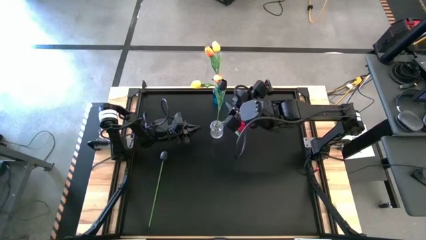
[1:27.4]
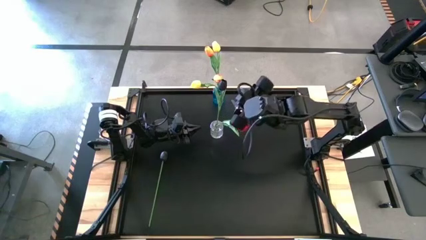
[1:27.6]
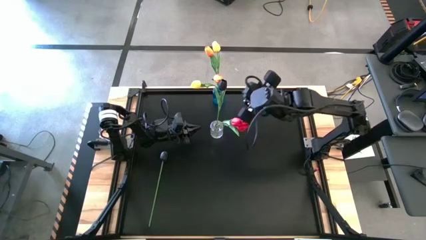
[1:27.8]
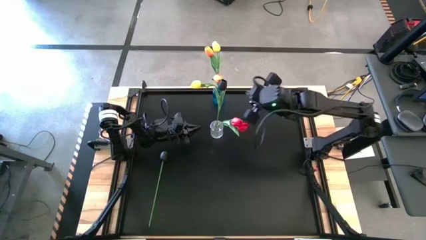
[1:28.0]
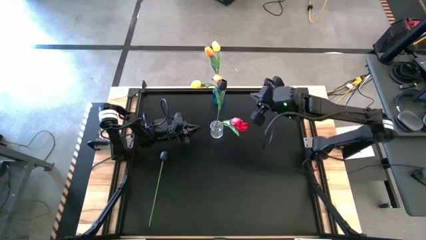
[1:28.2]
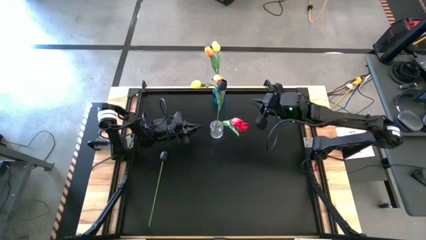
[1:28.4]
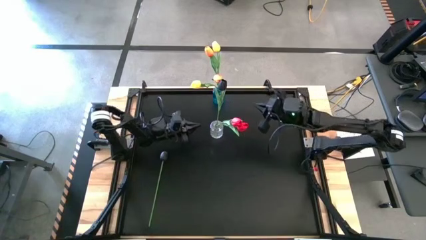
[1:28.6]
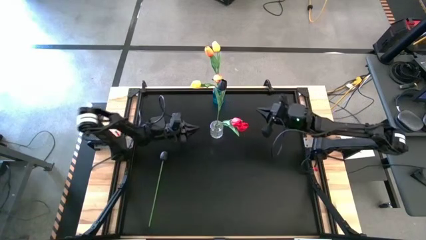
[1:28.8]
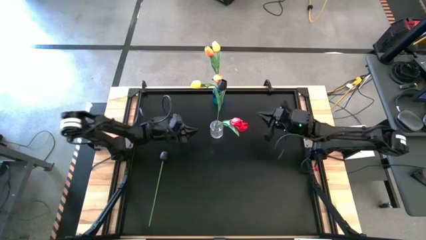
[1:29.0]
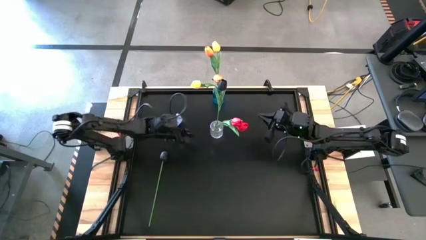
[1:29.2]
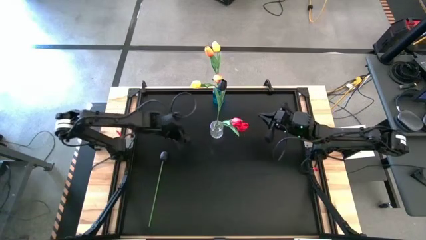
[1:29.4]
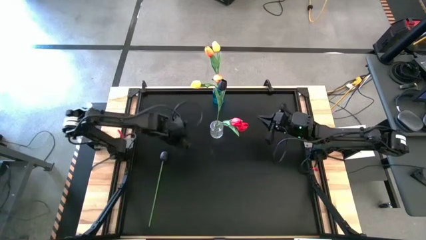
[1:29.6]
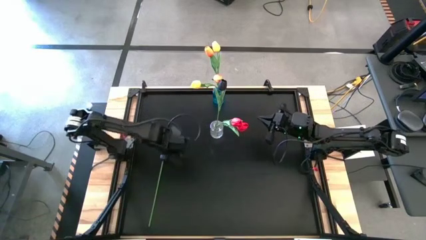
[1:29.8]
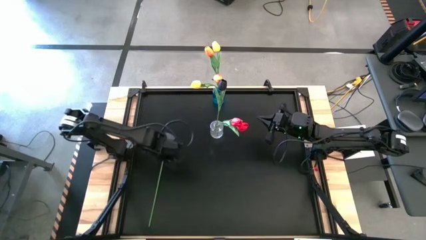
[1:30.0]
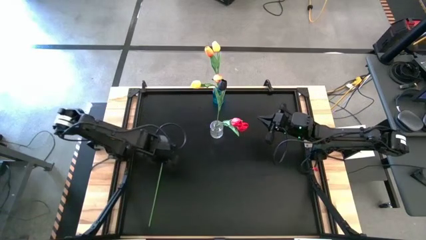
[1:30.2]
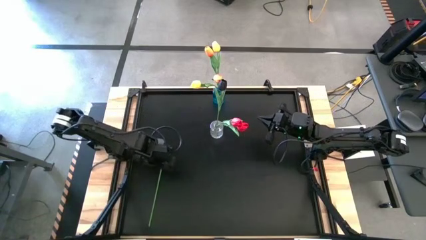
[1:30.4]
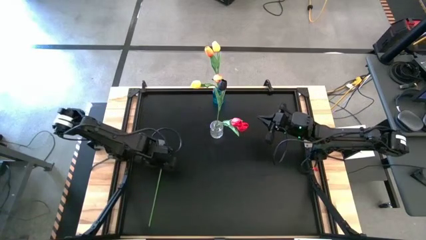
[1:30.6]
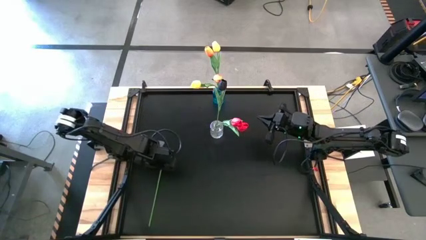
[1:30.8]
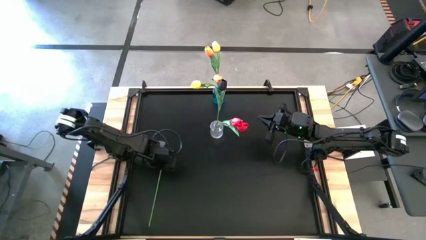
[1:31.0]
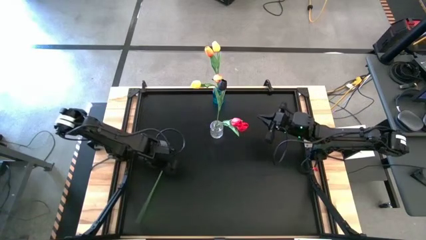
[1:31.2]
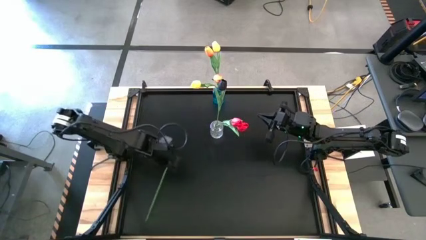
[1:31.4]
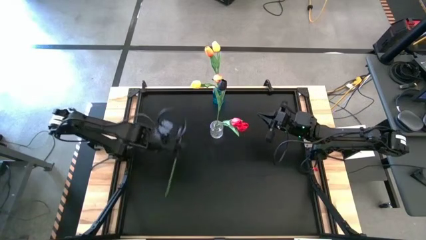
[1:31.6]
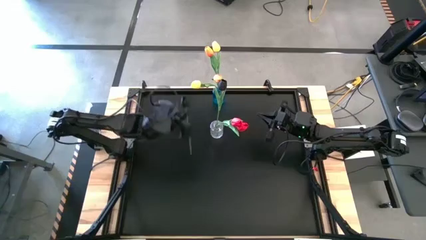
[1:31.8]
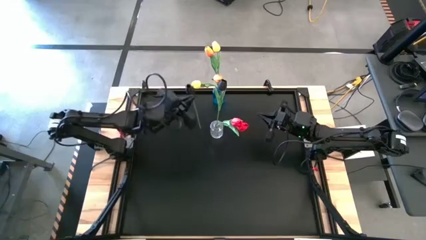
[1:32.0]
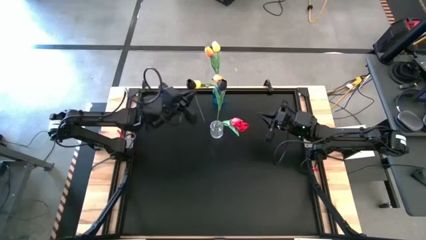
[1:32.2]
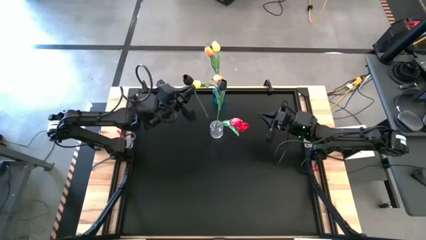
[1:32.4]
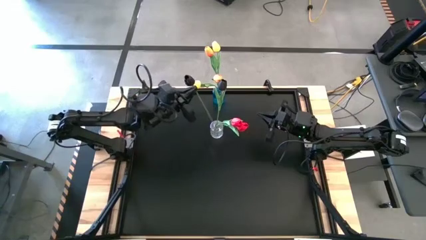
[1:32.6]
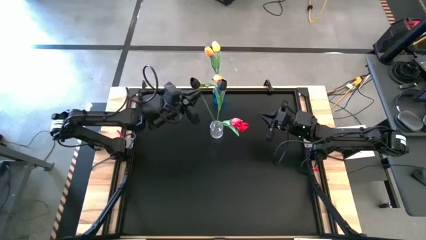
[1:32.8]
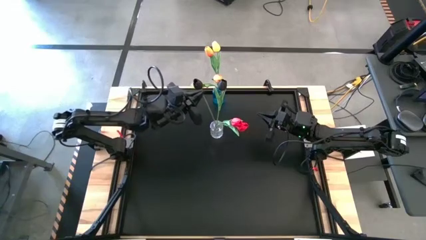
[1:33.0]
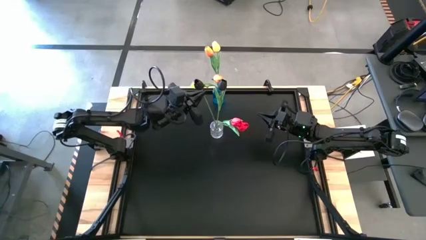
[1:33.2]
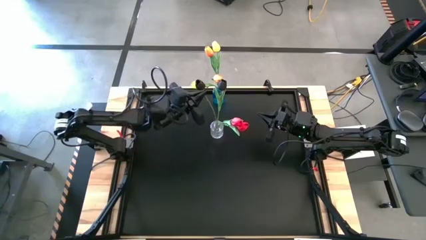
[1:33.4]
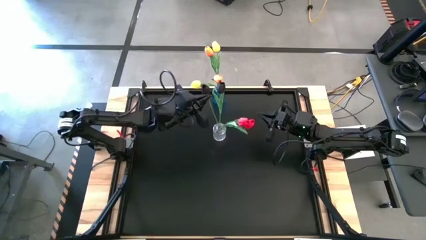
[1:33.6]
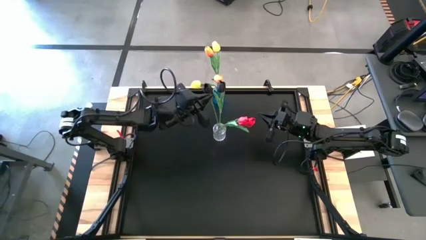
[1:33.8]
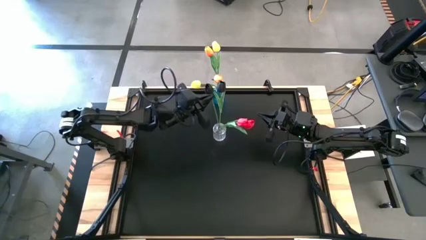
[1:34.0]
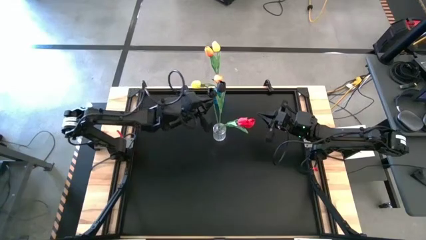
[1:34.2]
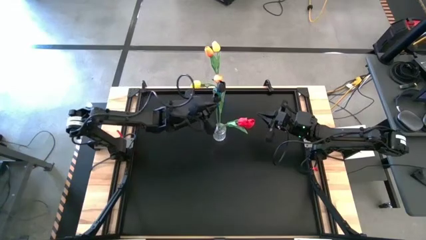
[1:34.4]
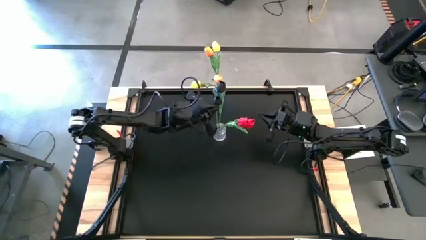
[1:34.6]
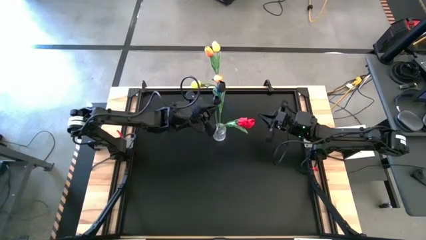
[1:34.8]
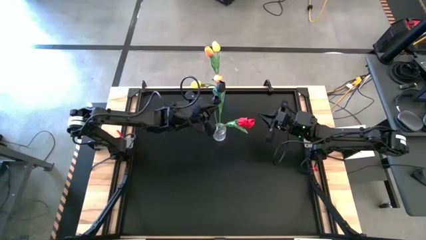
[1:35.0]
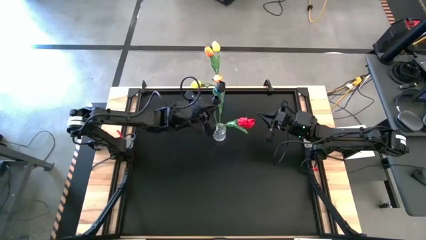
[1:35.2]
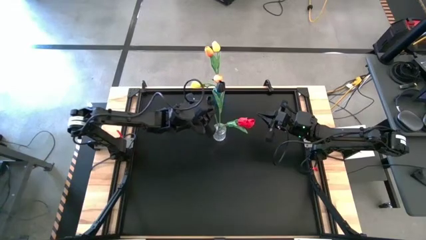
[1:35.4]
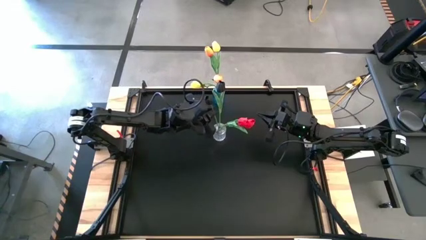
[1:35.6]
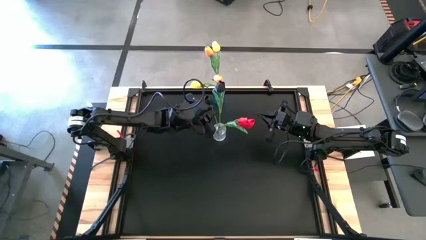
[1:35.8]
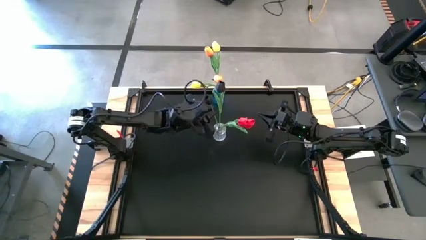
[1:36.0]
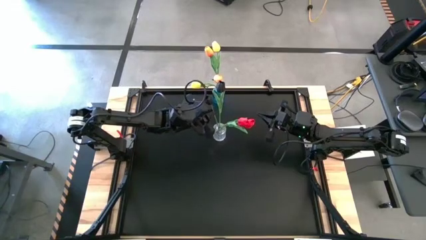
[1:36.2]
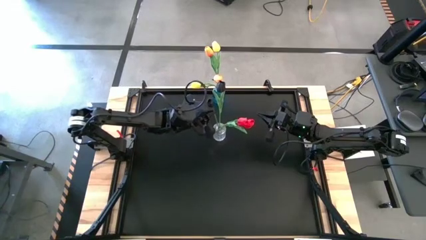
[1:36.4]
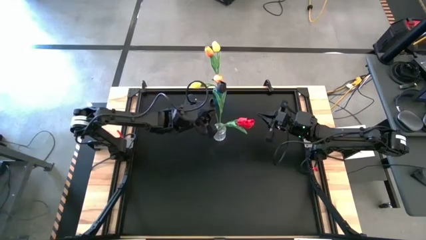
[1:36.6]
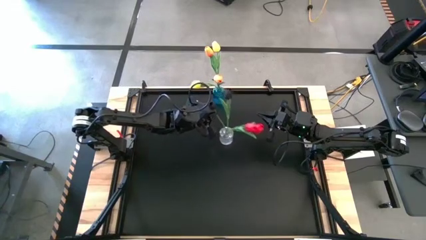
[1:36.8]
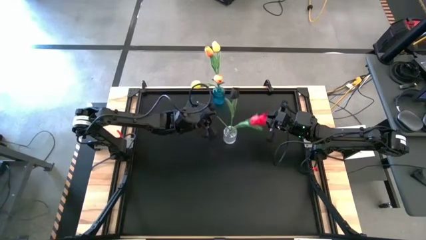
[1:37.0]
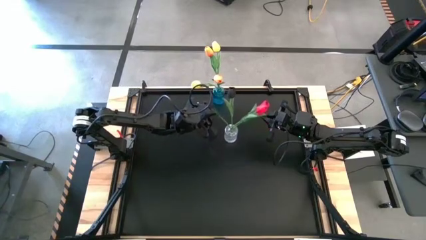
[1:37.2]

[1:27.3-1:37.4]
Task: Sort flowers into vase by color
Put the black tulip into the transparent vase

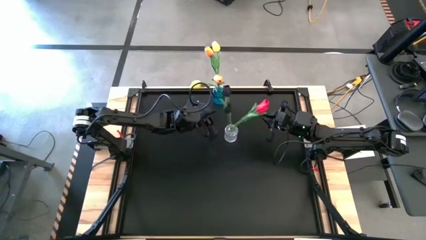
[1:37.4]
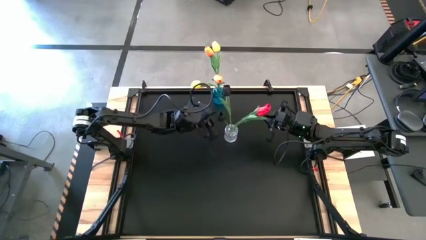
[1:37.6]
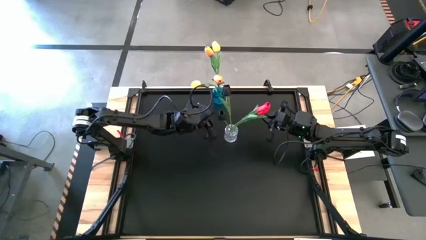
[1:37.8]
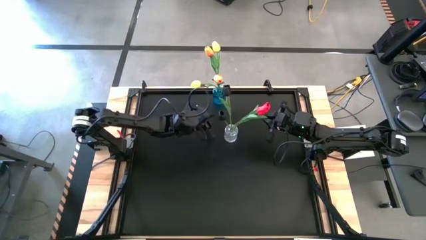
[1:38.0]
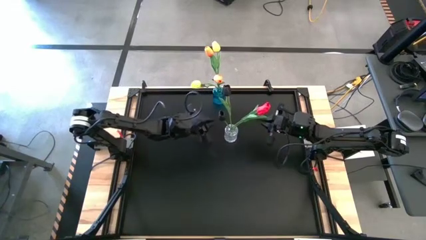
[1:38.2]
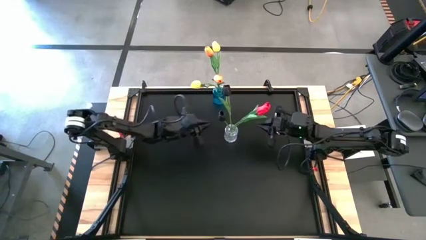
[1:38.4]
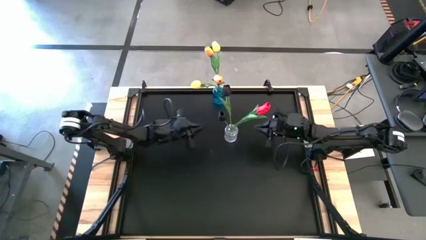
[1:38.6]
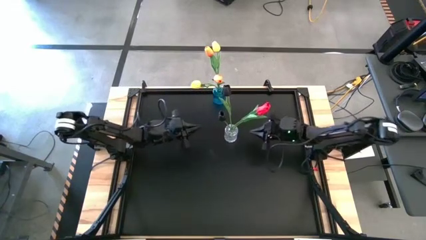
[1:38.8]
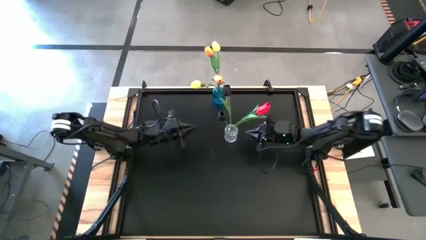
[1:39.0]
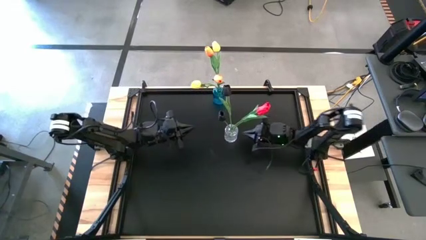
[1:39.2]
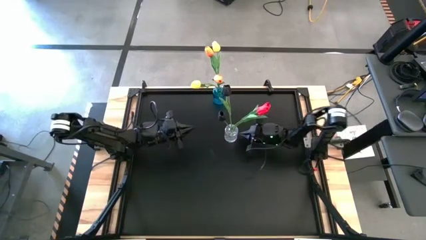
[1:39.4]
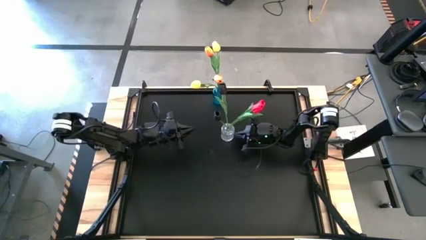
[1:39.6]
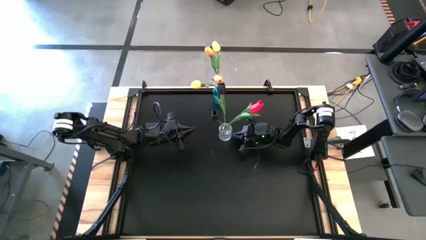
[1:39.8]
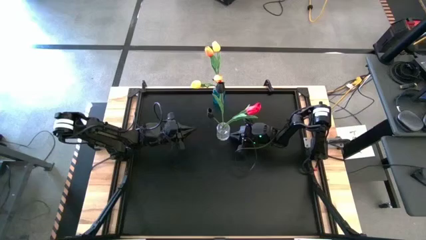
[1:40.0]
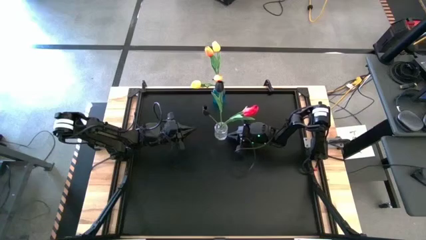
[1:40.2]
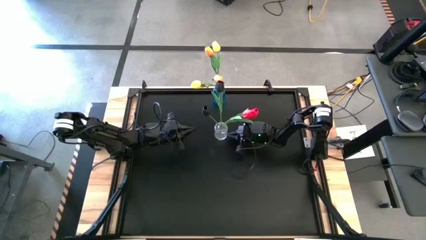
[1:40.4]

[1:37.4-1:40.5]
Adjust the transparent vase

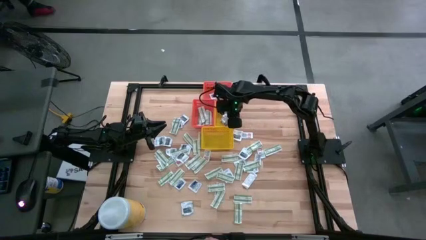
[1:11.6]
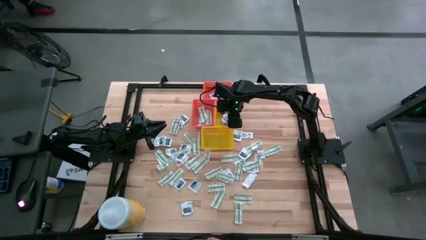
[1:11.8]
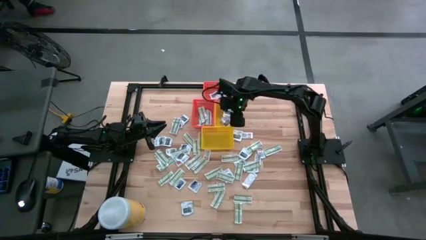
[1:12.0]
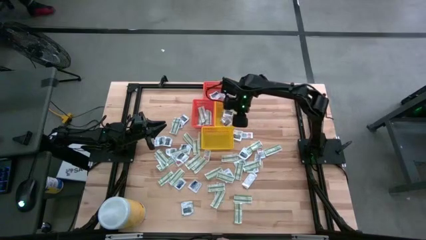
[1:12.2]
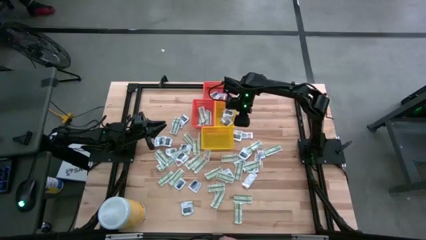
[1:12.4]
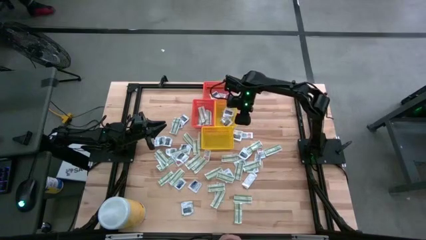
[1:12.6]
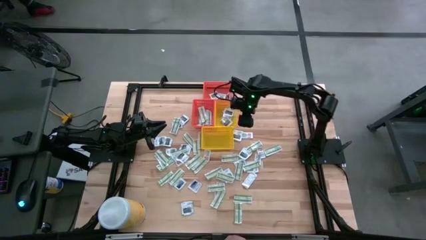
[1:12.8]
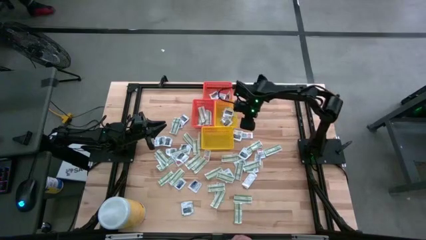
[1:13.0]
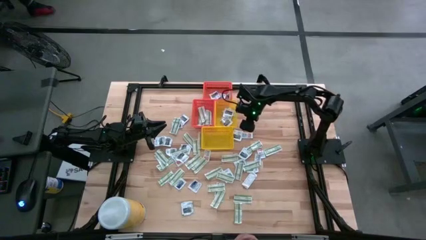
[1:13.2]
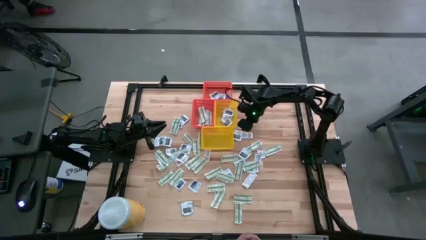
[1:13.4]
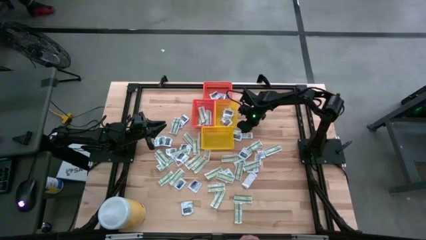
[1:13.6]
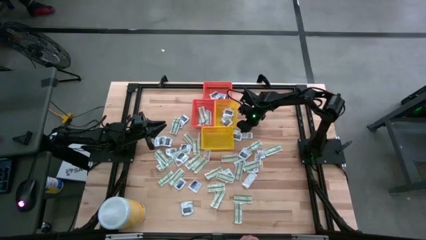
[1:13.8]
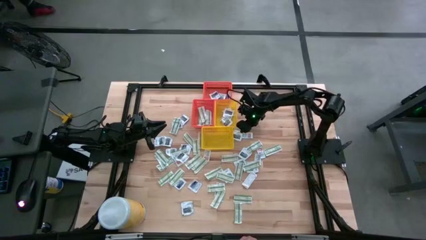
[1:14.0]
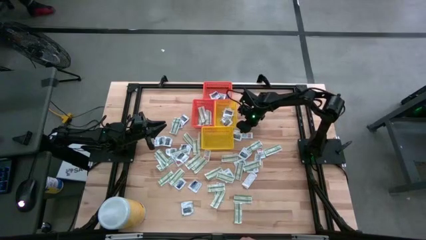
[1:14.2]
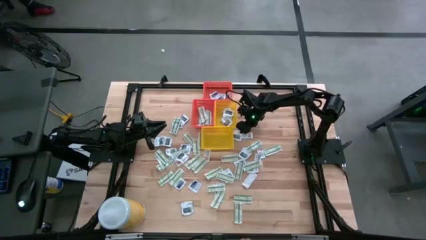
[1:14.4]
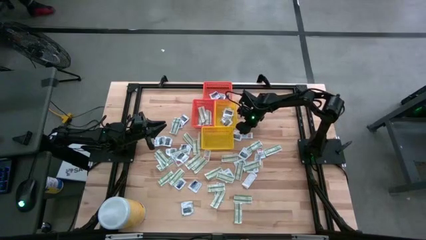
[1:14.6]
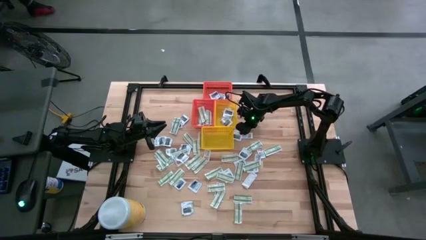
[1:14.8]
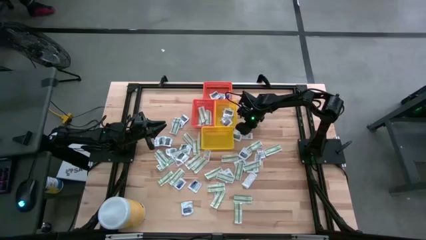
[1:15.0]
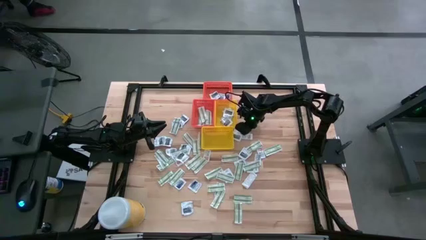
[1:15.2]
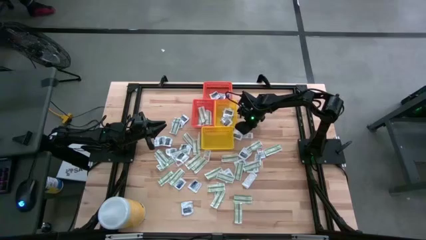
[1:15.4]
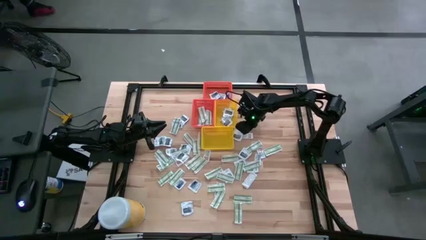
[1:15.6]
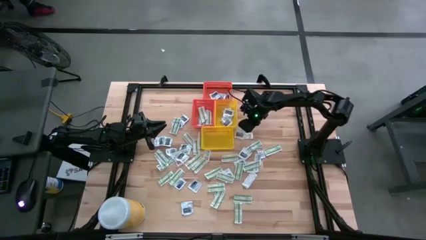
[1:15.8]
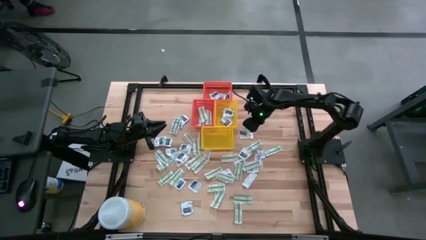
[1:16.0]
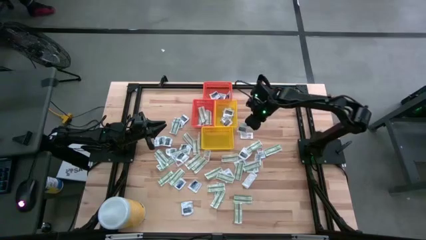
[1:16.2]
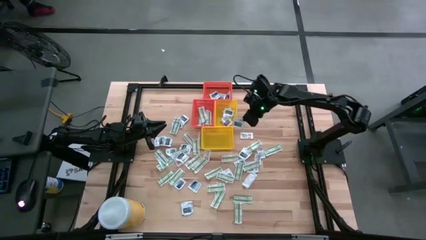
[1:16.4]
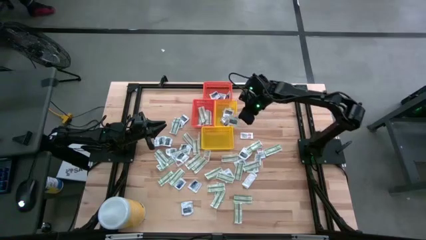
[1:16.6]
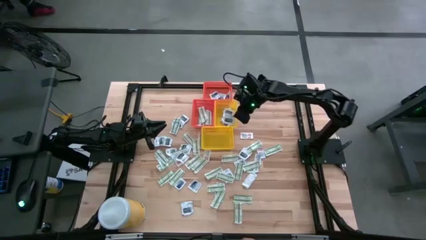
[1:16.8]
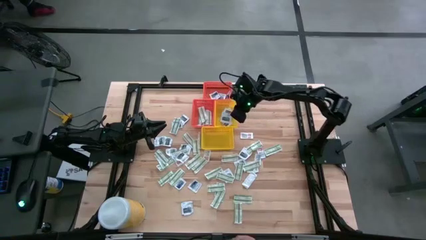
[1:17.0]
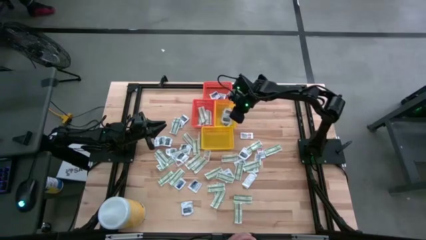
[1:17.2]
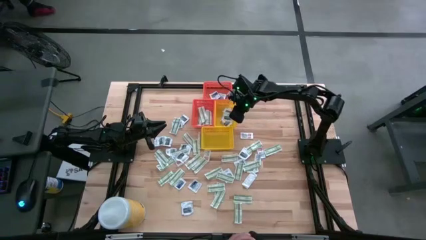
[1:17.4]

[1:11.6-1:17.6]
Task: Pick & Place First Aid Supplies
Put the towelette pack into the top yellow bin
